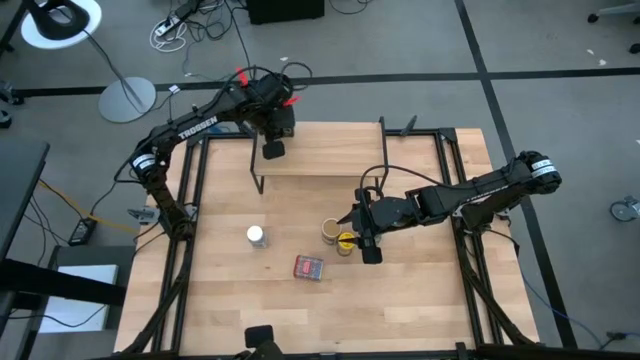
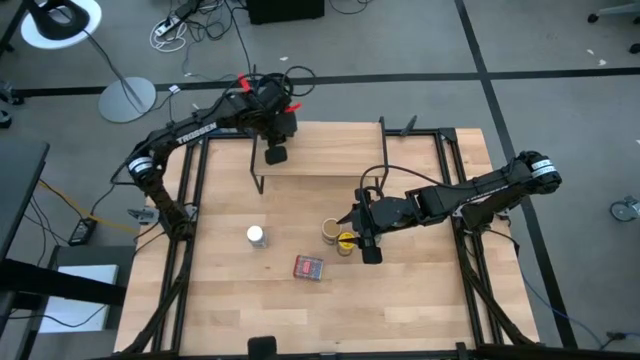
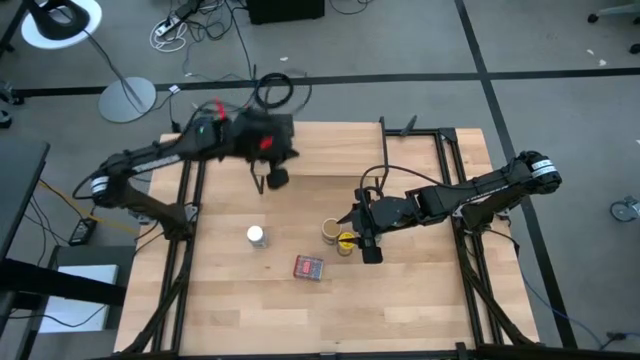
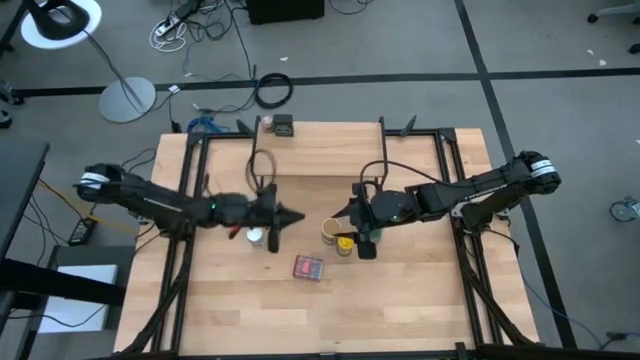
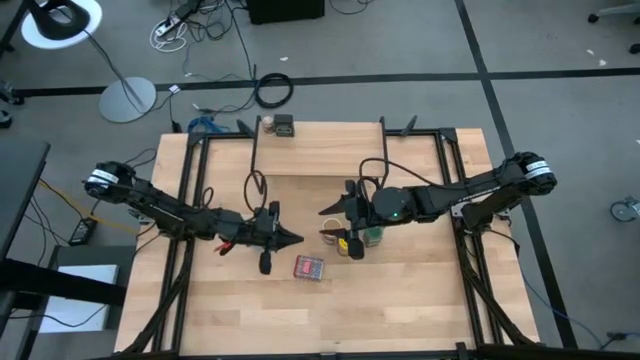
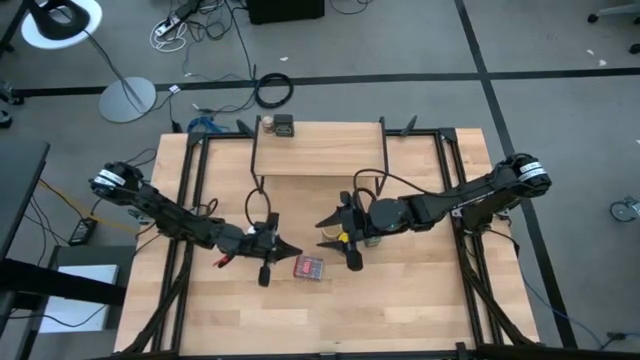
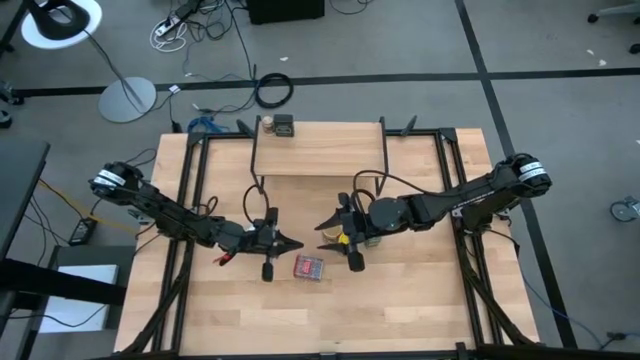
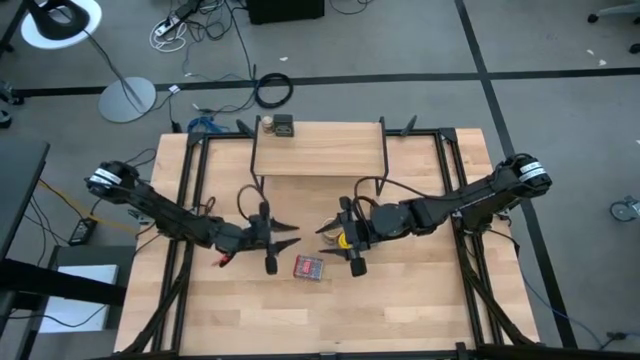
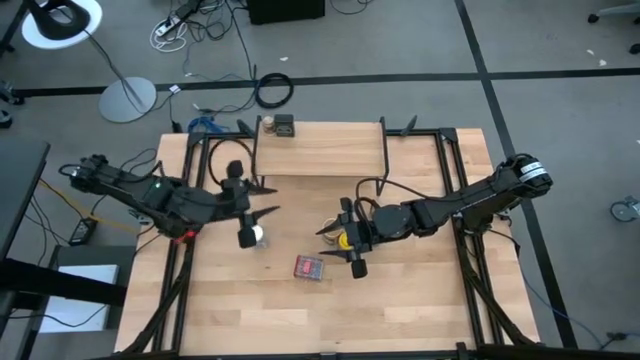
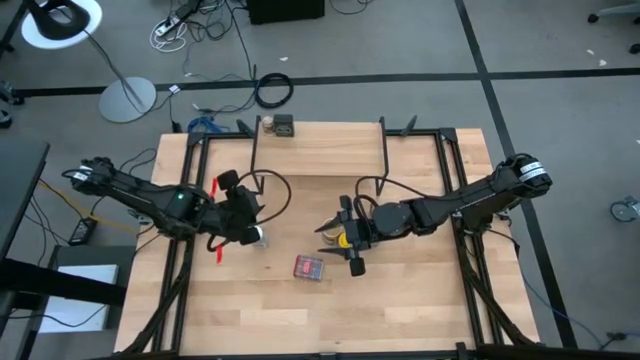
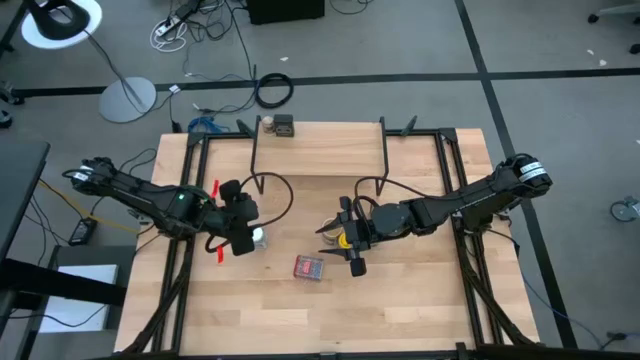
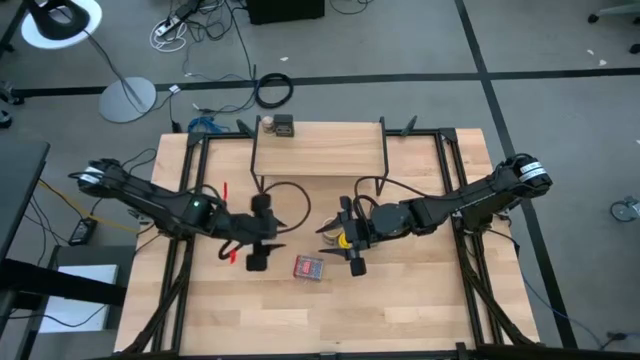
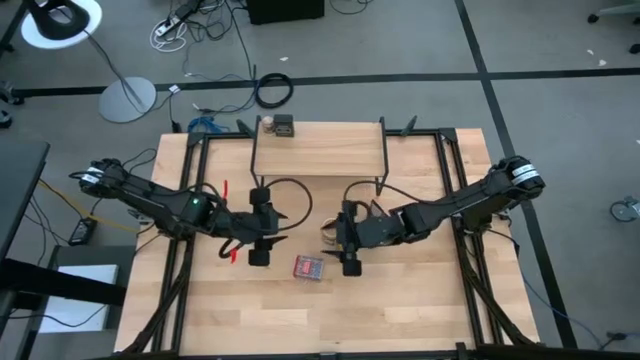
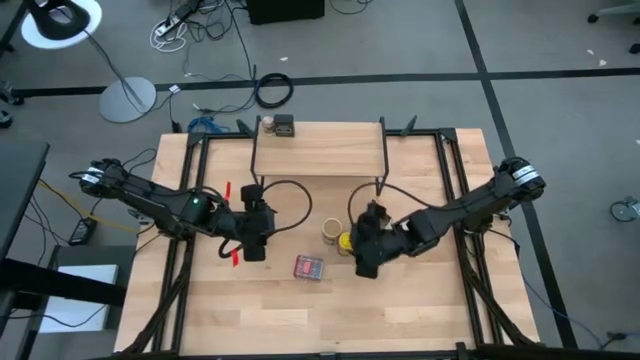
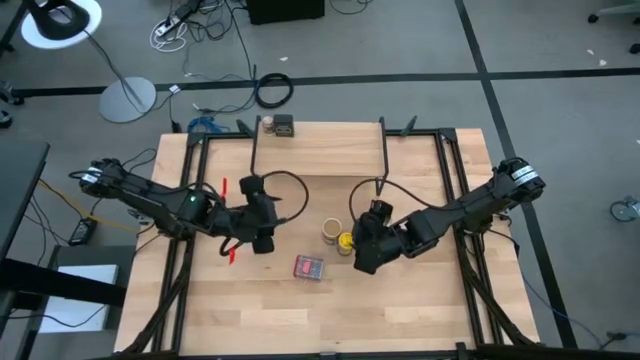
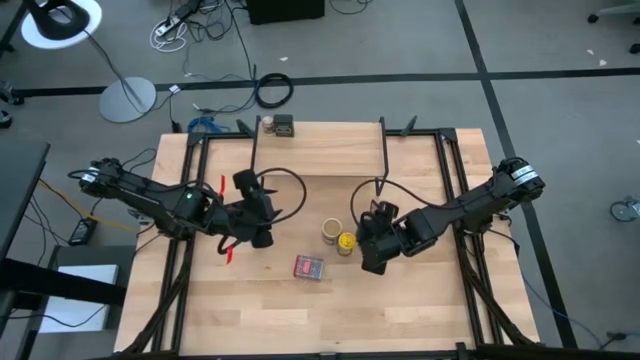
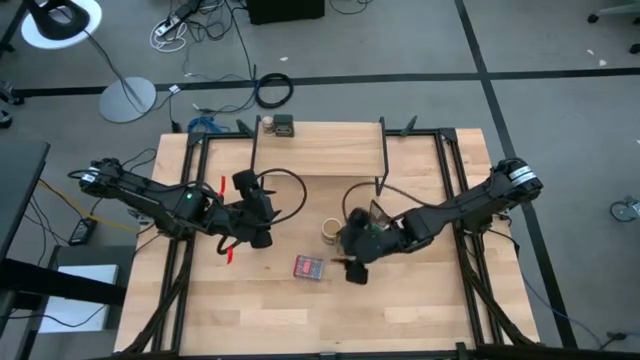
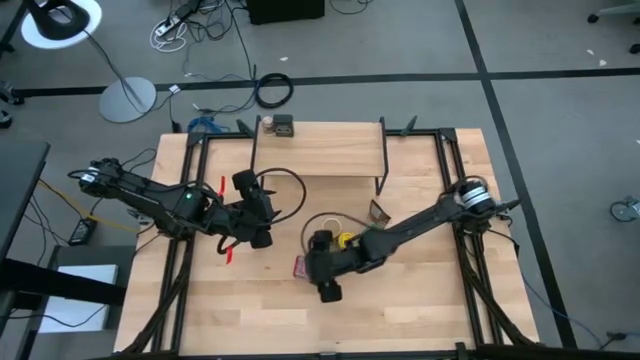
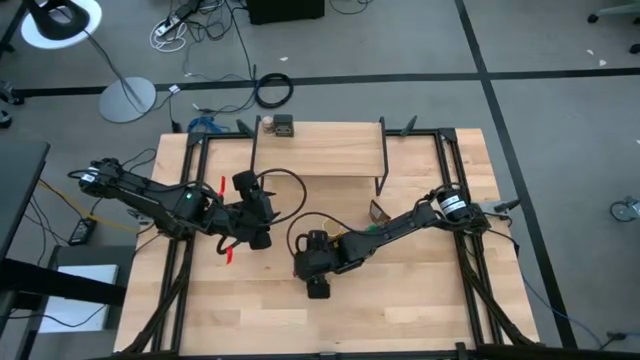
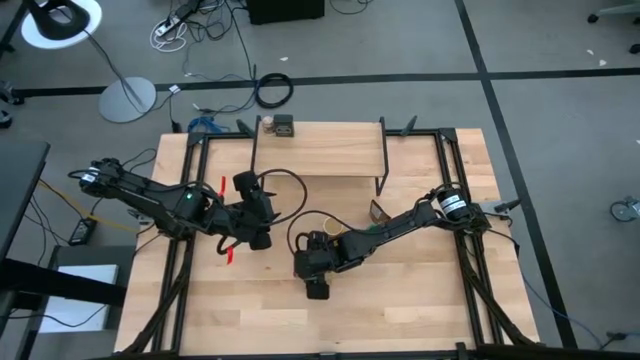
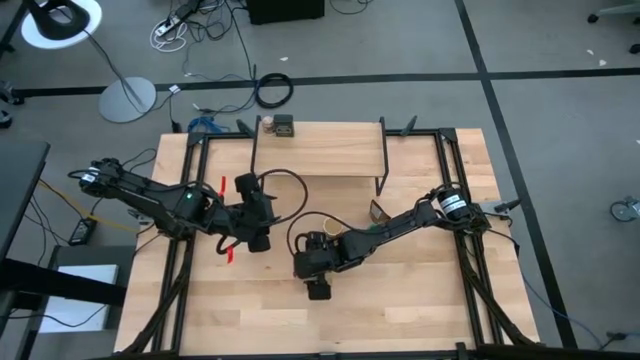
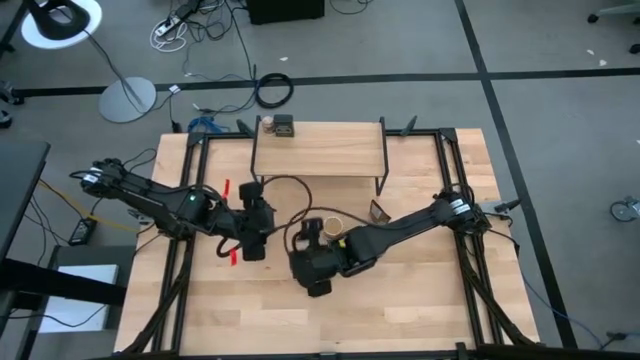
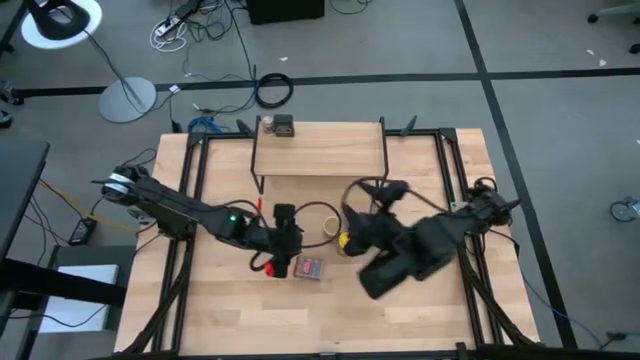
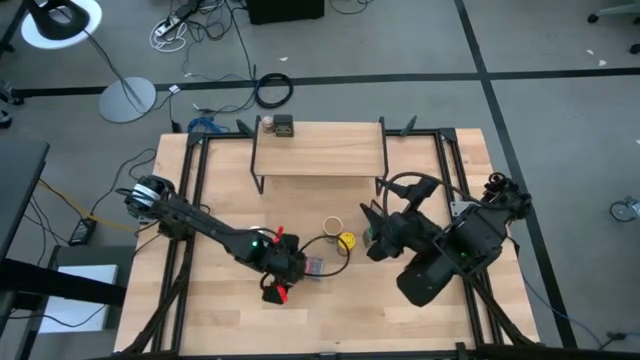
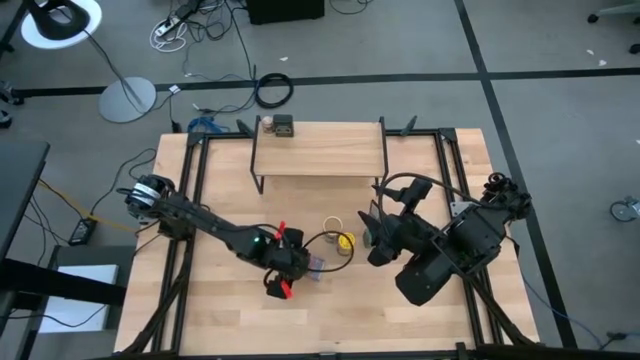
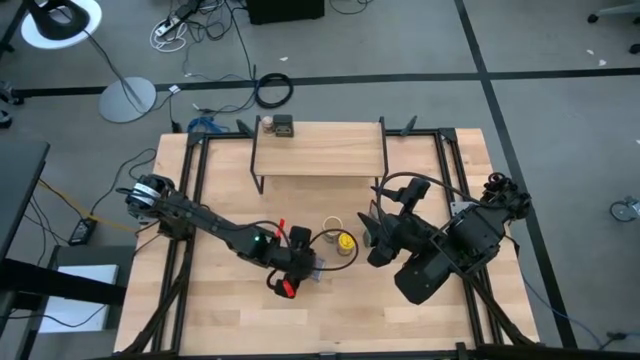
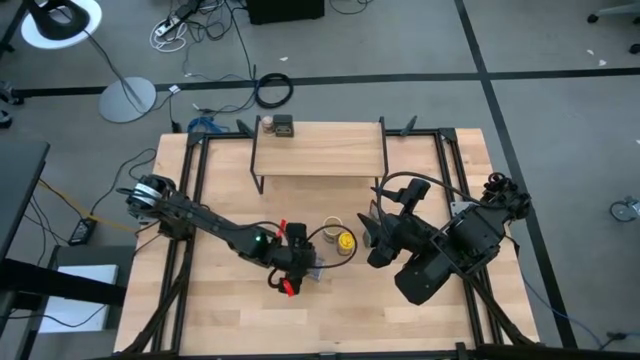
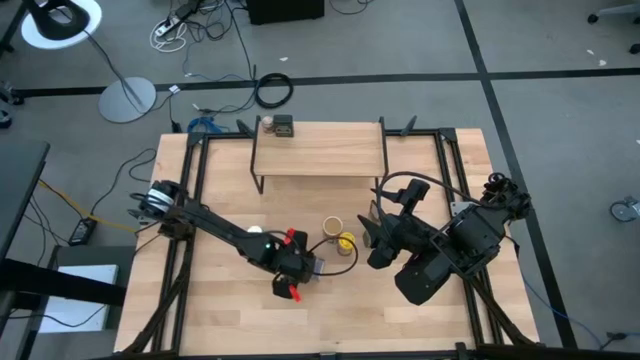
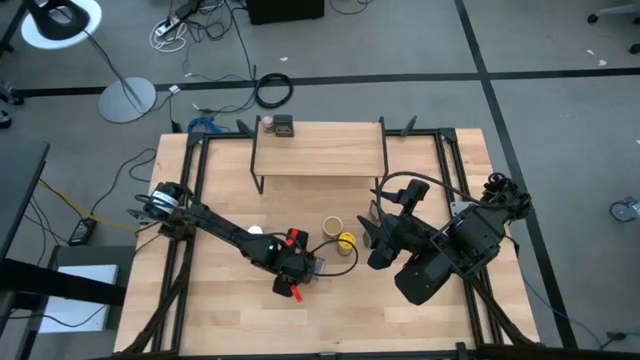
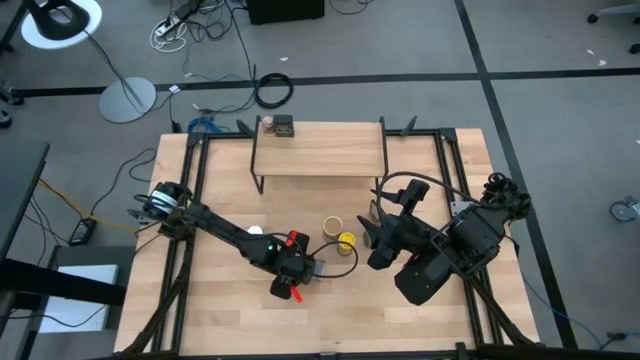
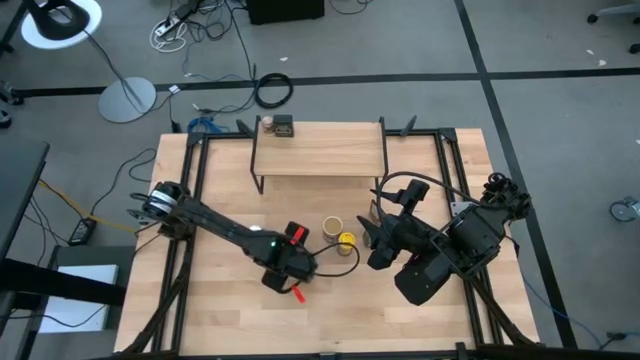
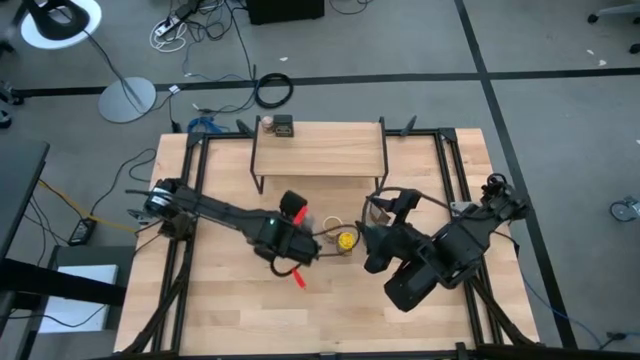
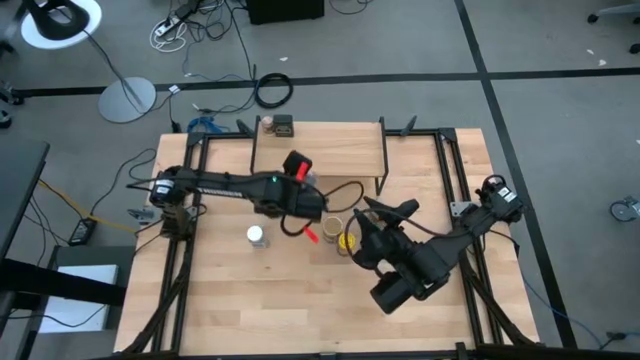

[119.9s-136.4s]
Task: Shelf spices
Put the red seasoning can on the shelf

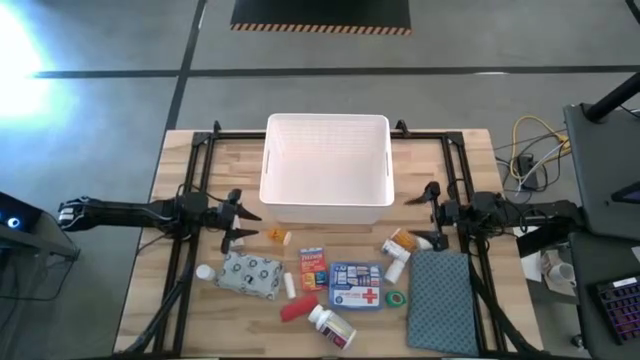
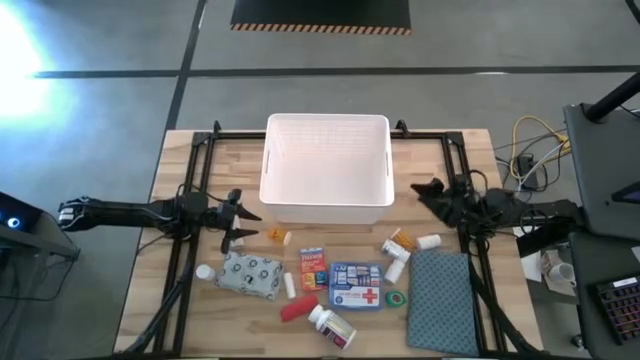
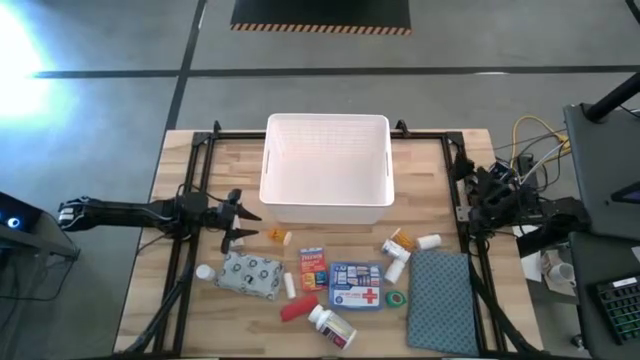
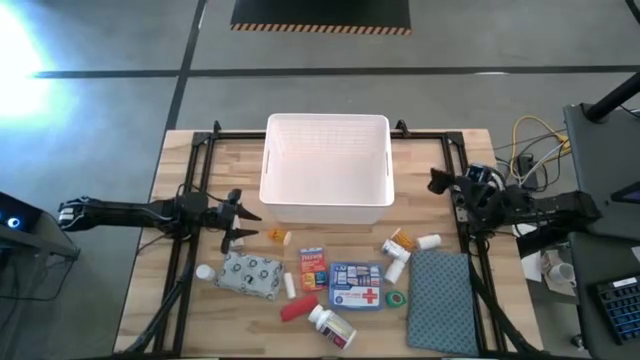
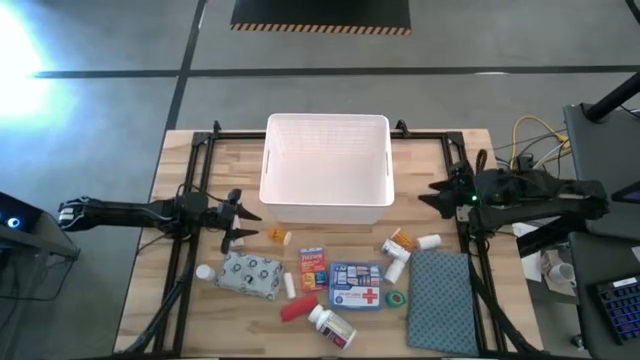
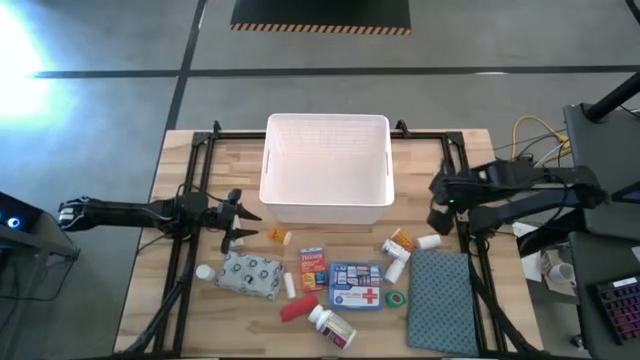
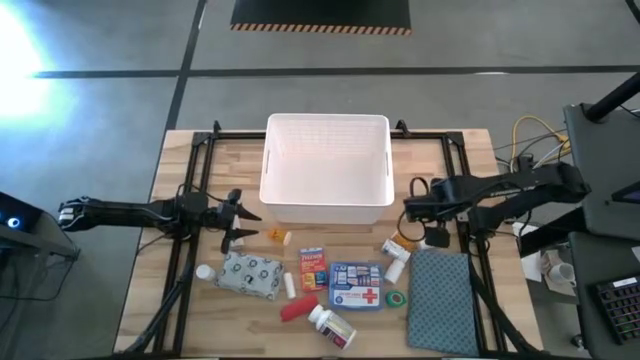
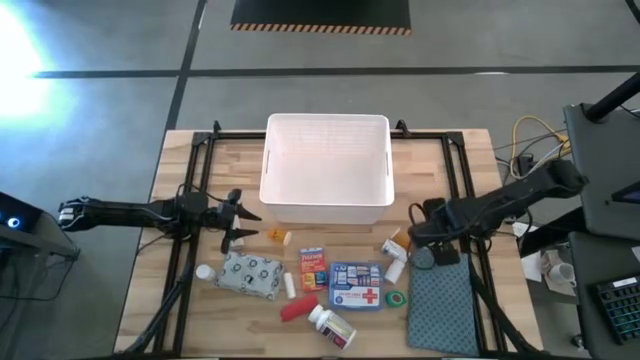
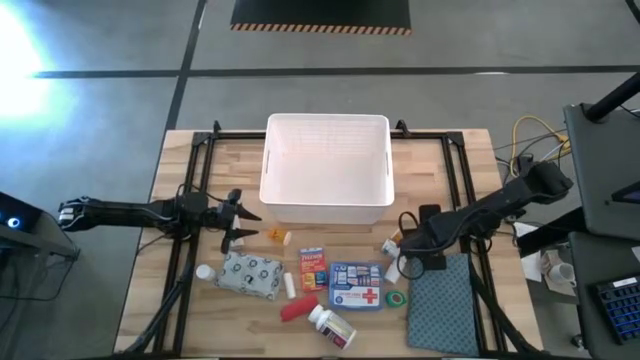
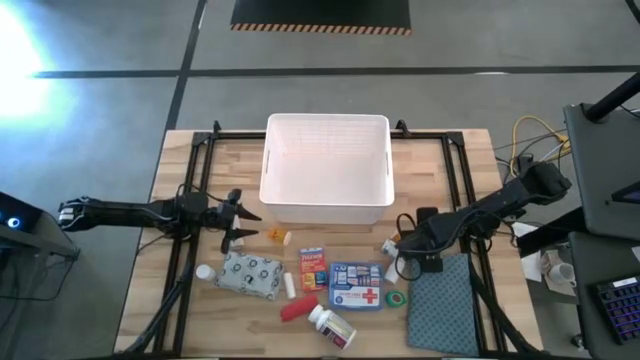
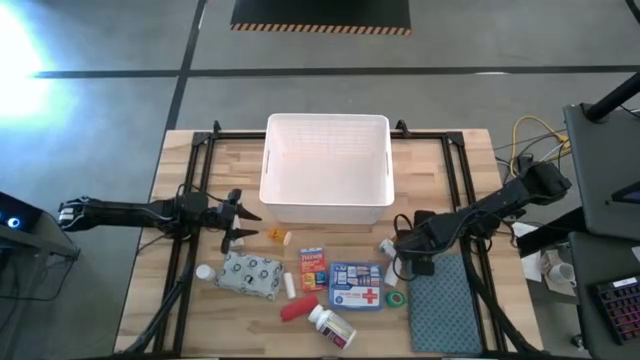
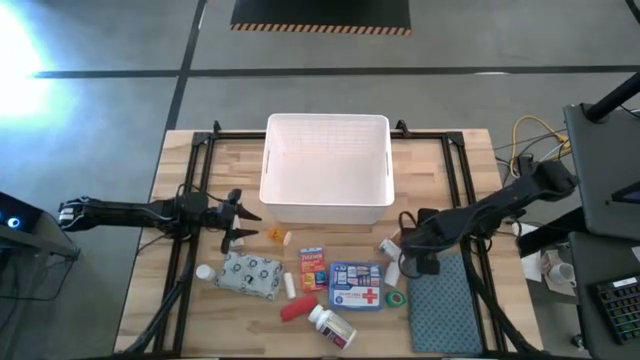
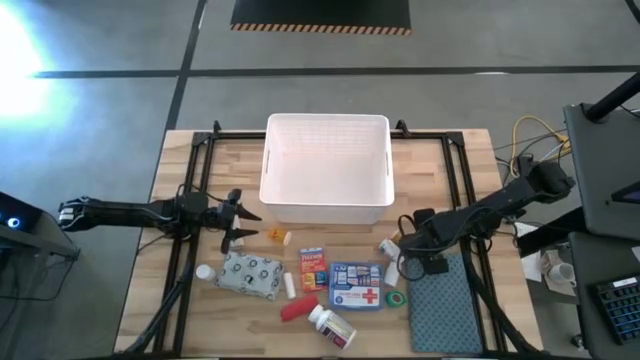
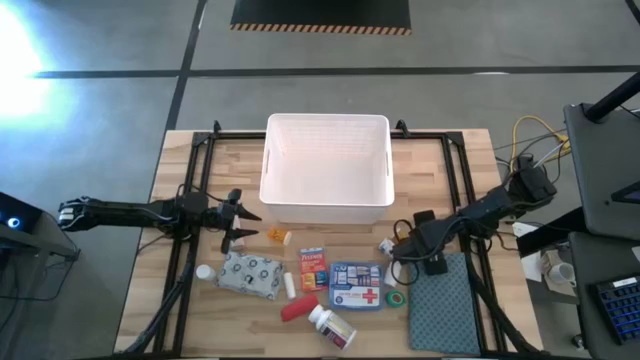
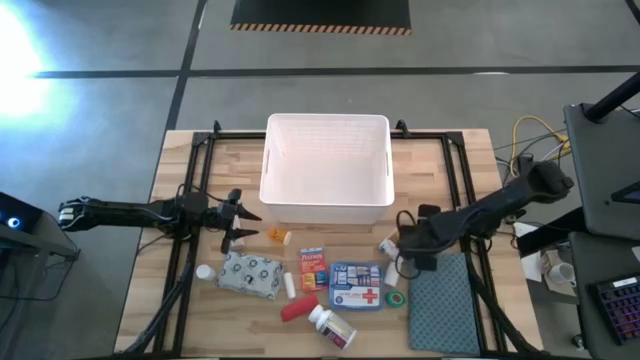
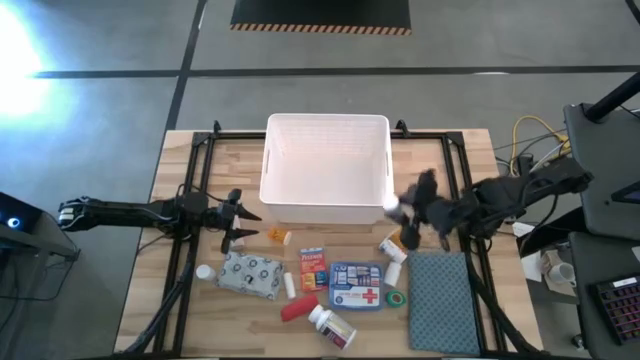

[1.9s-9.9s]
Task: Pick & place medical supplies in basket/bin
Put the white pill bottle into the white bin
